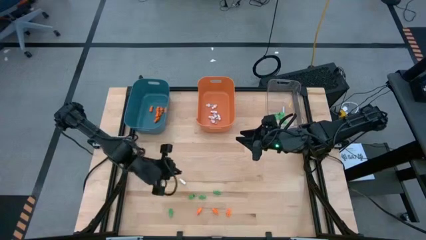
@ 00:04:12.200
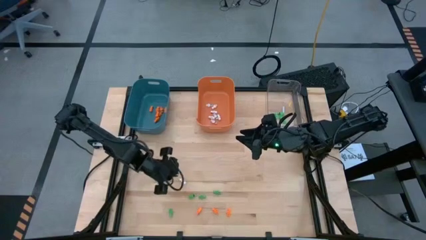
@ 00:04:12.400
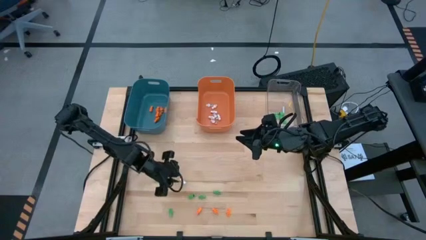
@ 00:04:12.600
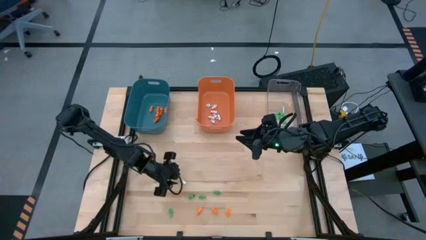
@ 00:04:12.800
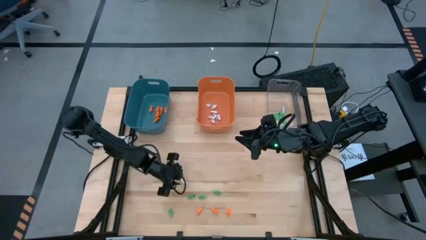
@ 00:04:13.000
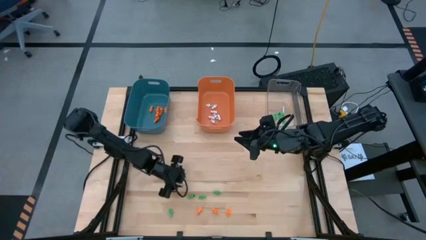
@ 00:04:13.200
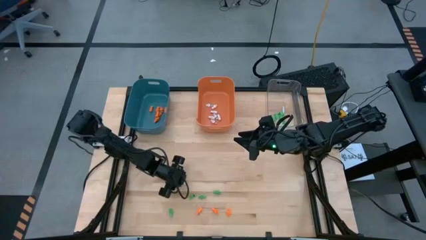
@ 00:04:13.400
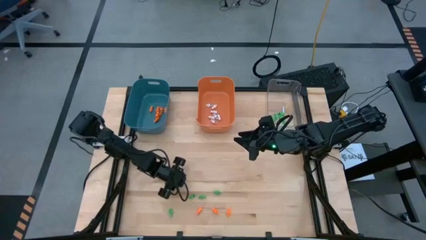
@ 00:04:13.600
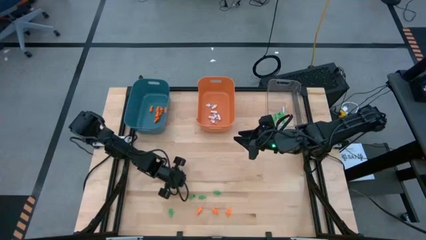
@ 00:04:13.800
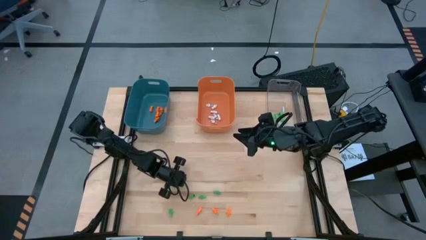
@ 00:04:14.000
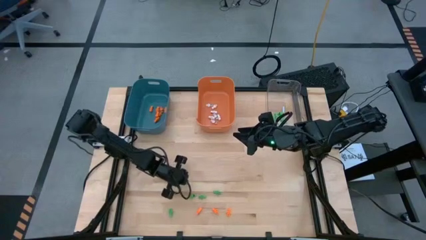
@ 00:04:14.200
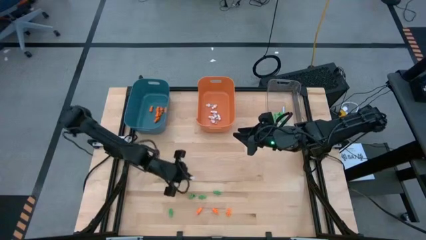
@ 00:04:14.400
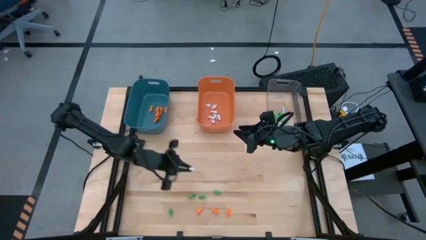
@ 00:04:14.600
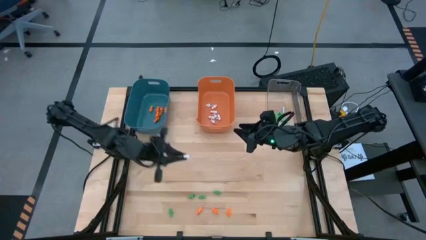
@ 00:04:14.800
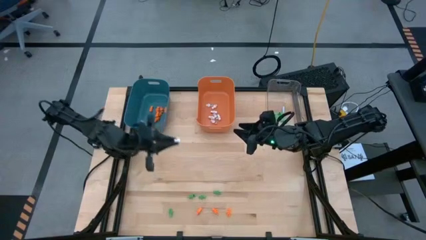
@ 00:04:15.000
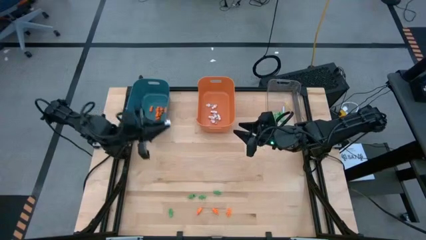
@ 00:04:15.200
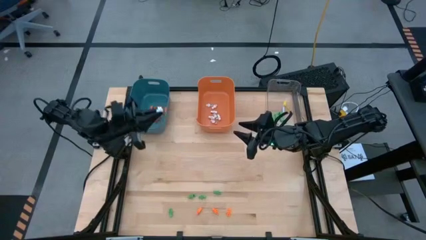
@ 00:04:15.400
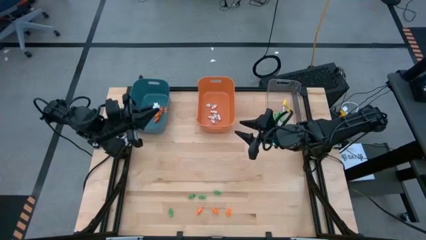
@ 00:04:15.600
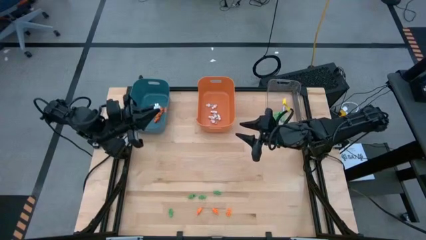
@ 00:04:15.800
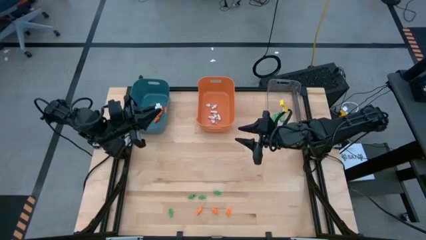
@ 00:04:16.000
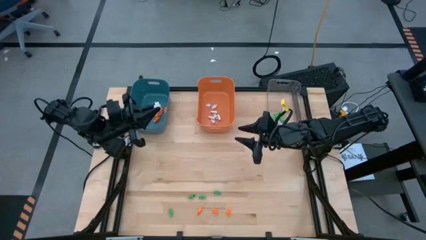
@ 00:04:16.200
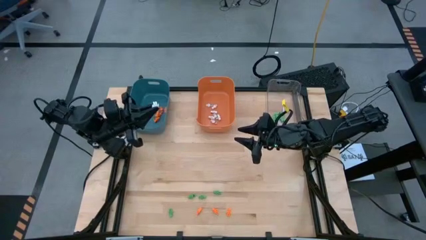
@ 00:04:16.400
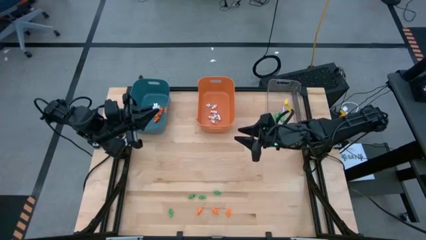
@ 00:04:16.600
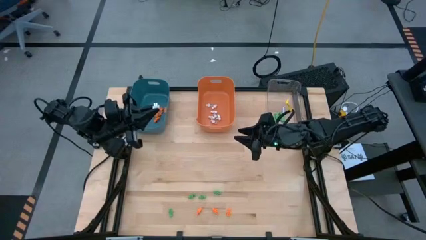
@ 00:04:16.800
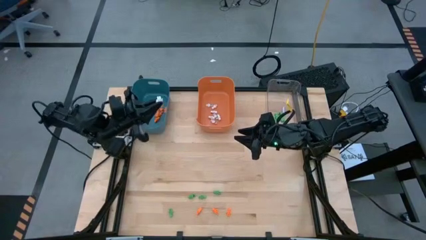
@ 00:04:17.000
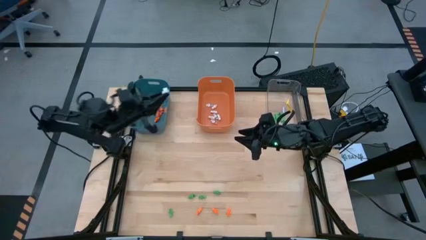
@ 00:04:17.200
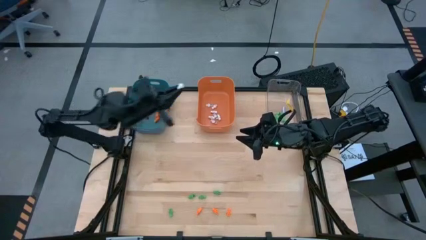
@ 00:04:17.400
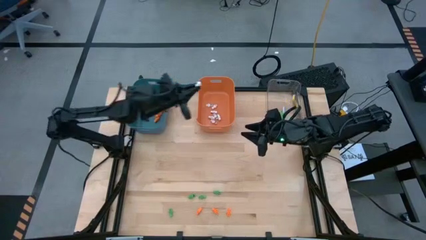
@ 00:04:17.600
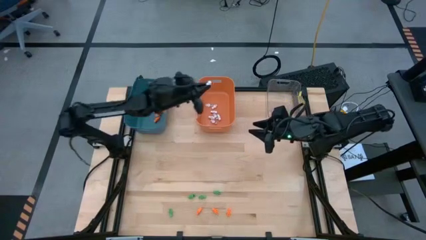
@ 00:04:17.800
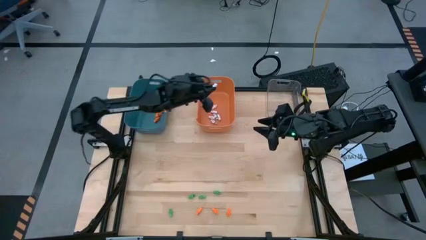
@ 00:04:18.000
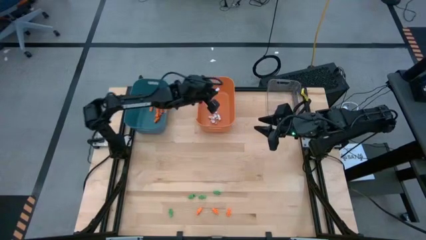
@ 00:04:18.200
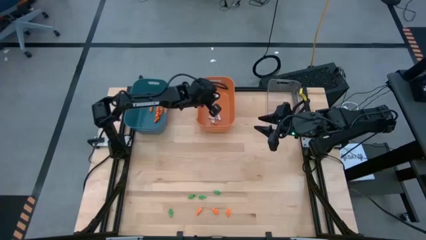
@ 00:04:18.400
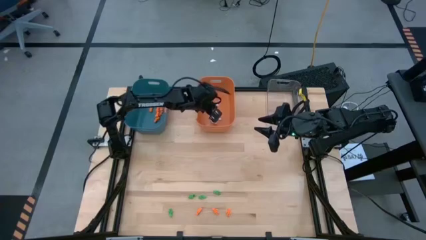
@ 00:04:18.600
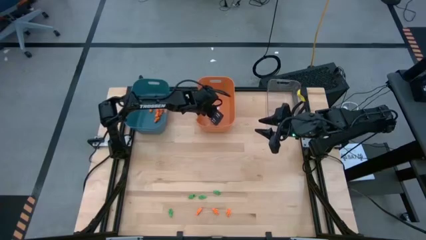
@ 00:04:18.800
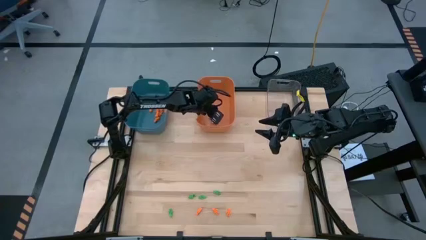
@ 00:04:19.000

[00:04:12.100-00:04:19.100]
Task: Sort Halloween decoration
Put the white skeleton toy into the orange bin

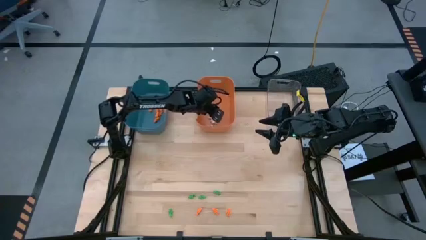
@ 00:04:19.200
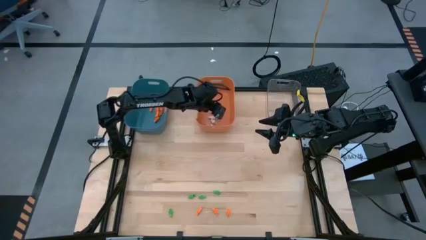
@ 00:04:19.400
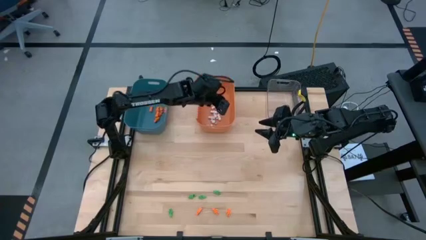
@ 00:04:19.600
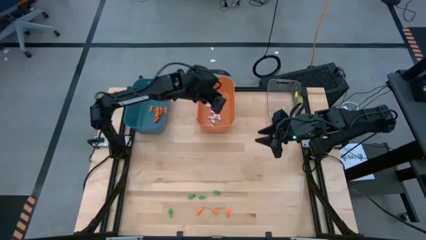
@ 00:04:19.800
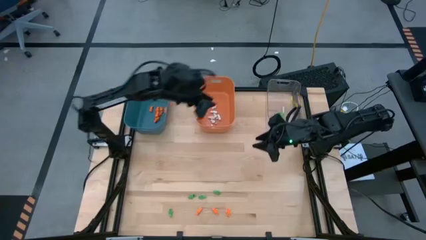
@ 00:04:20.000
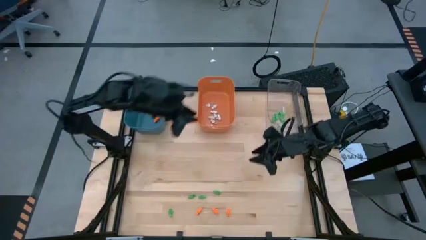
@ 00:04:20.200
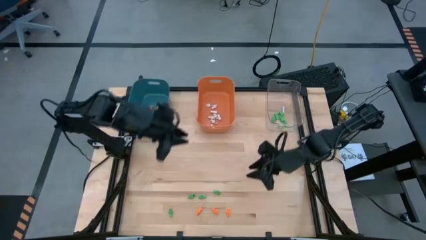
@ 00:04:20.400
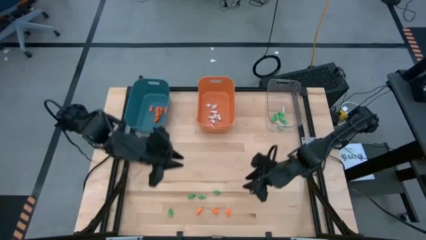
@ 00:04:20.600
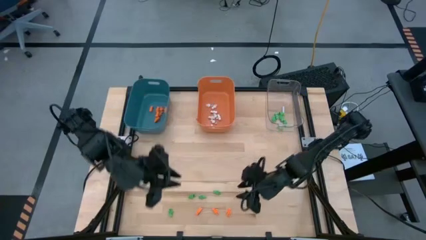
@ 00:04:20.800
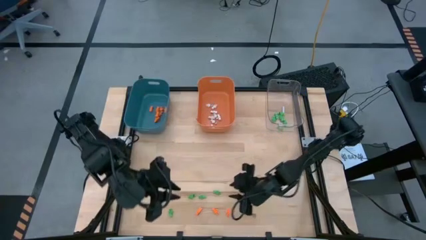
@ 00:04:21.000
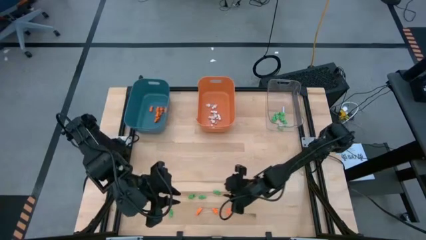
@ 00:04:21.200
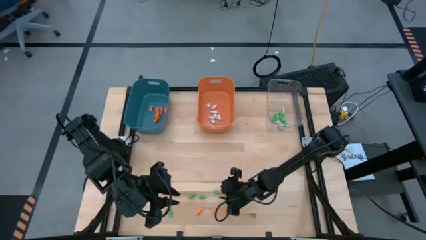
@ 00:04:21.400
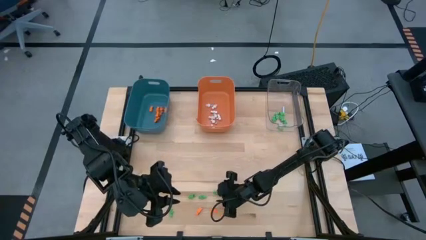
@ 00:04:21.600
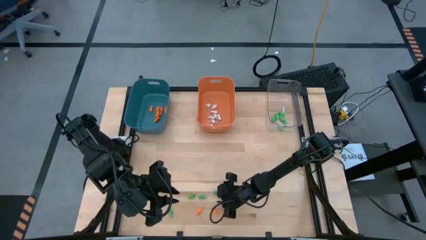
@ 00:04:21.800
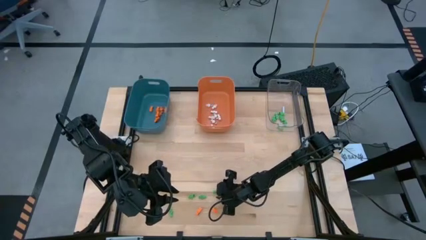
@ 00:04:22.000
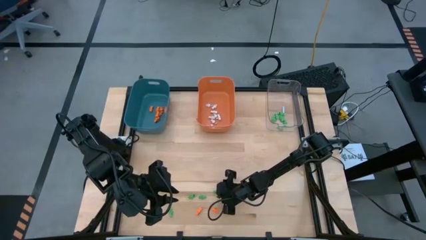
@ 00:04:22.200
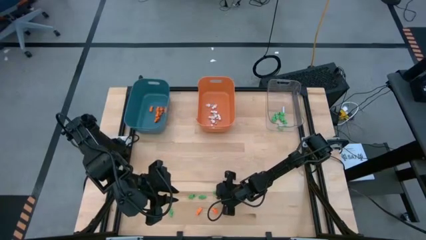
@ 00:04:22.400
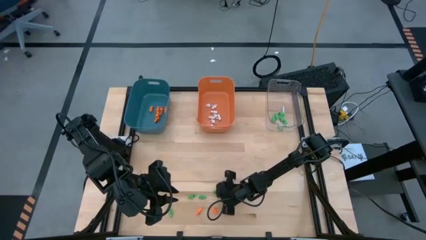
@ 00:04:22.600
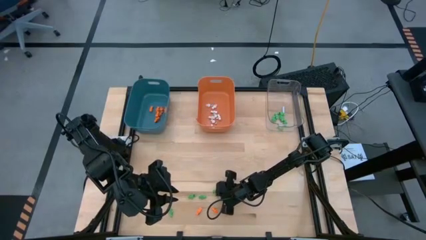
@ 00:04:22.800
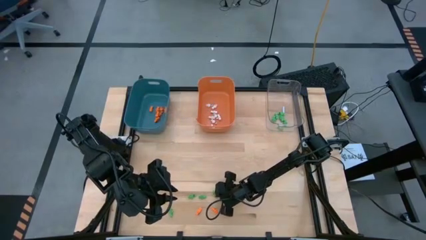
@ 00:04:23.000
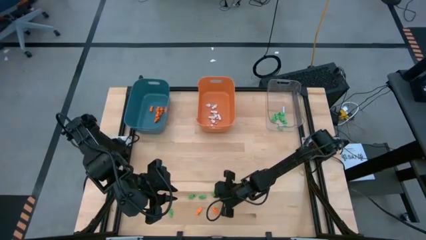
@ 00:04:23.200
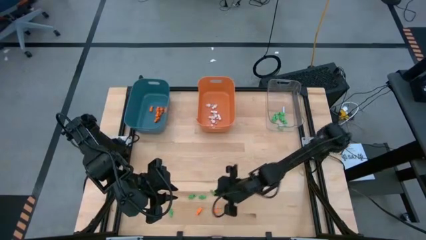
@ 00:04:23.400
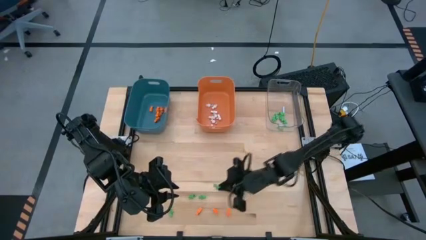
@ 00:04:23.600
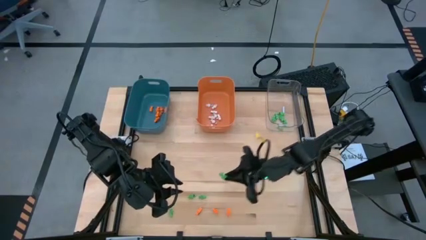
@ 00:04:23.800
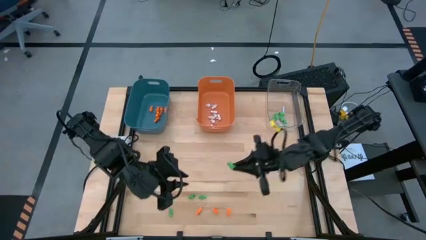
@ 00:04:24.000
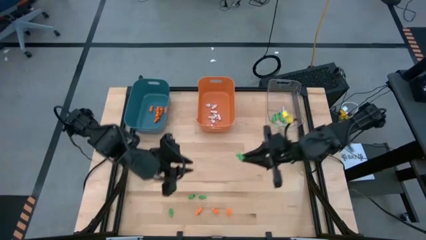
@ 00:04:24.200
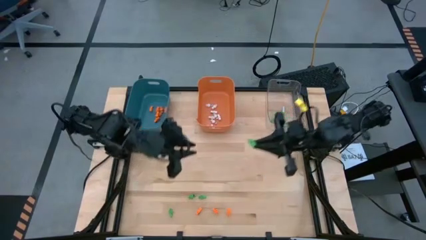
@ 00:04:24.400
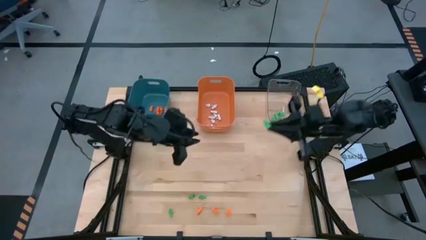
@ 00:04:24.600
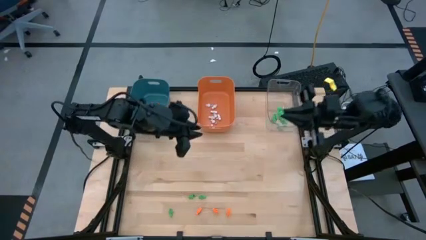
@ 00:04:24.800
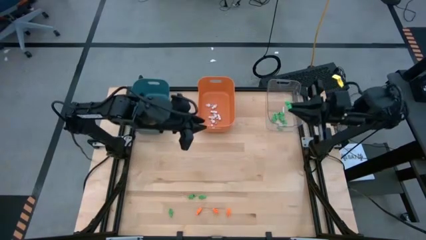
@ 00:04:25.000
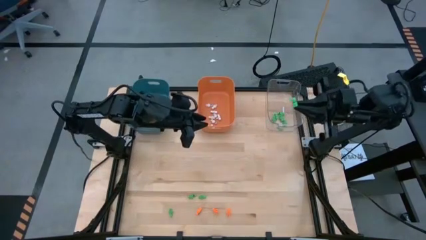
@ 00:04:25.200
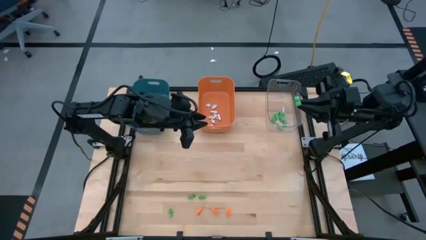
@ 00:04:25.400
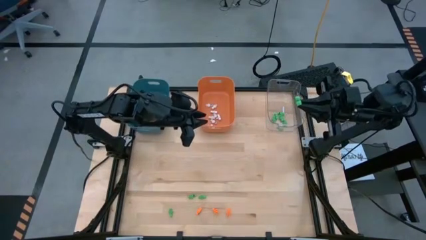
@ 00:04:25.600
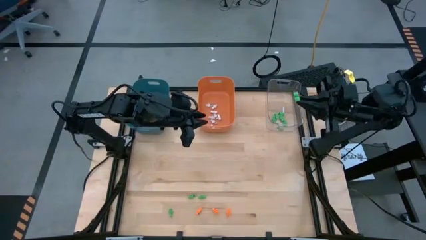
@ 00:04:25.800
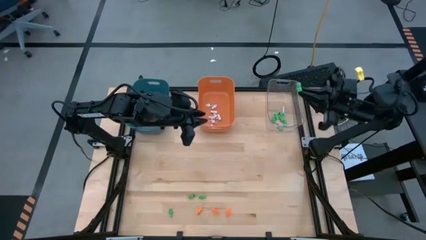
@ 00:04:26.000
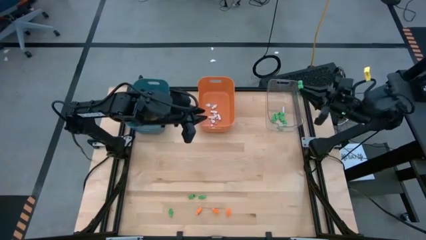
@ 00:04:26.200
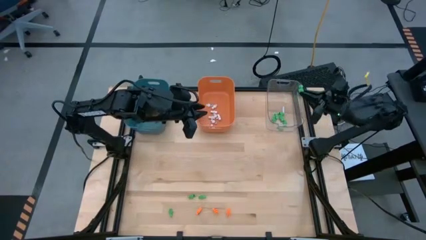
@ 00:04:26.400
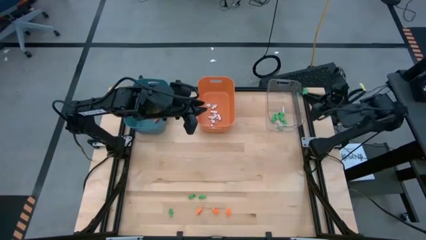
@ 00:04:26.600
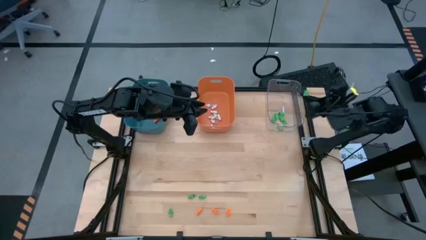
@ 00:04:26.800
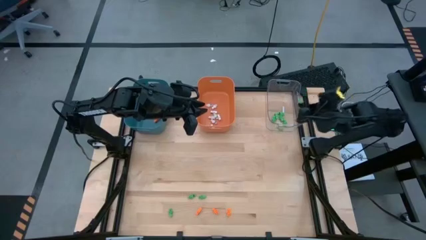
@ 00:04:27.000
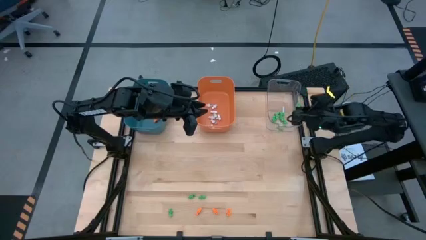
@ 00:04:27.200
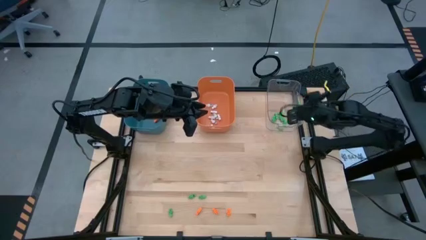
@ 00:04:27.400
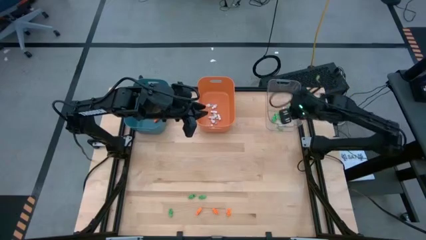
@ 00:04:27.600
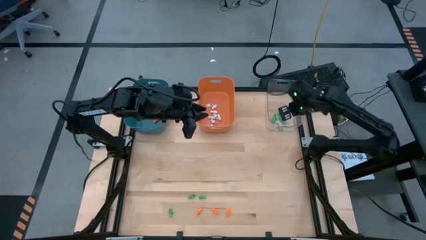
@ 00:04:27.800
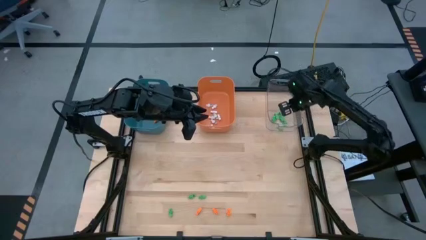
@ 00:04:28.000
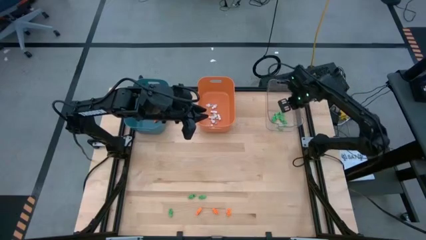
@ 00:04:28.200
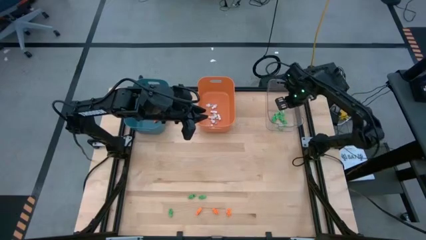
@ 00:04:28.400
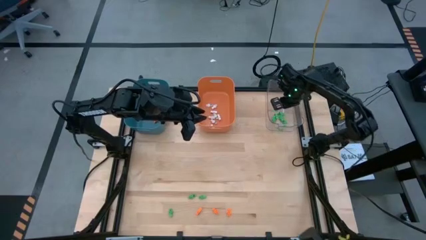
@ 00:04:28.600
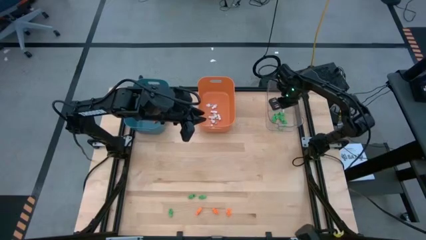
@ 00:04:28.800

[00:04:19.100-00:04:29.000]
Put the green skeleton toy into the transparent bin
